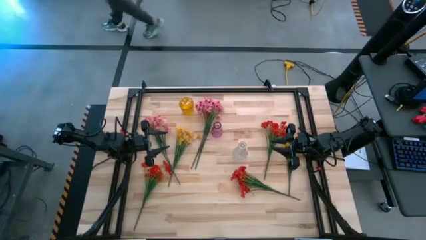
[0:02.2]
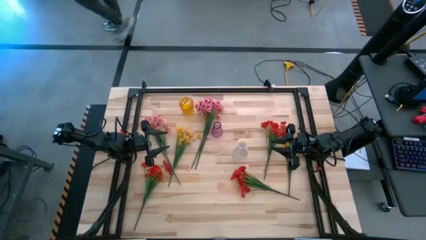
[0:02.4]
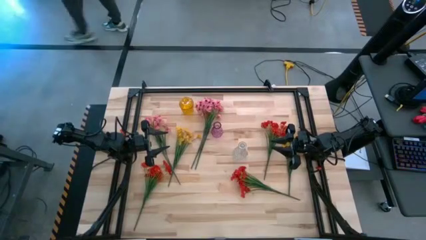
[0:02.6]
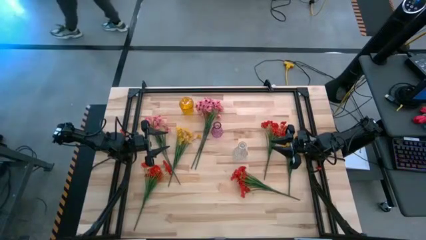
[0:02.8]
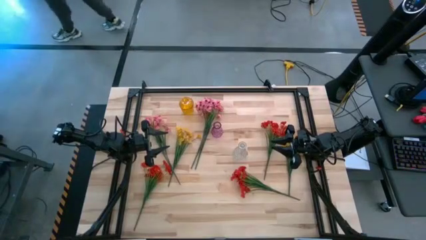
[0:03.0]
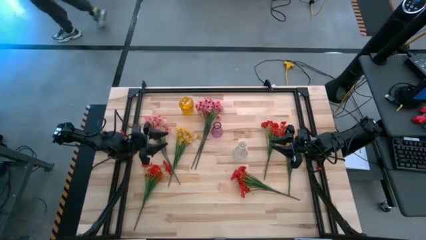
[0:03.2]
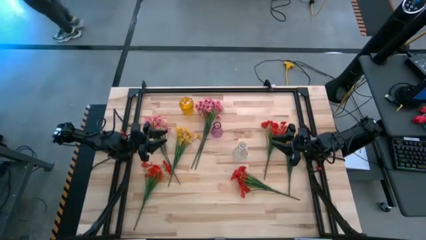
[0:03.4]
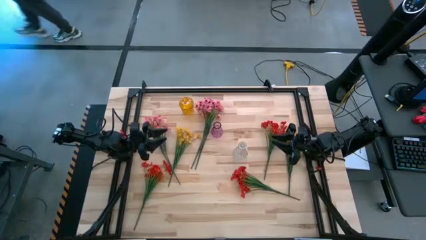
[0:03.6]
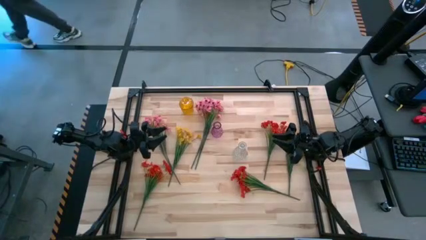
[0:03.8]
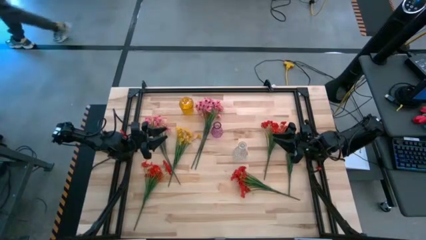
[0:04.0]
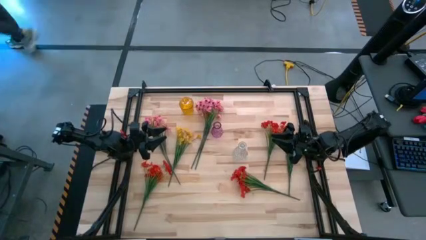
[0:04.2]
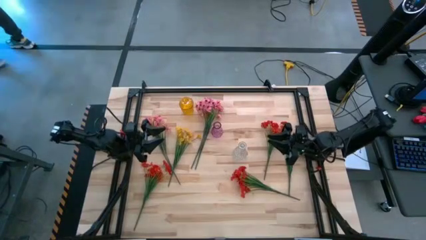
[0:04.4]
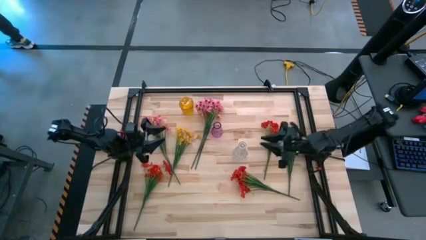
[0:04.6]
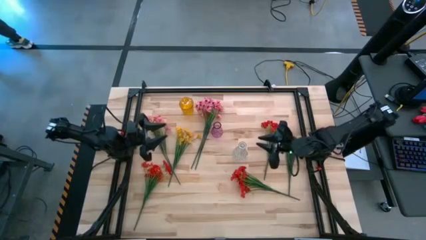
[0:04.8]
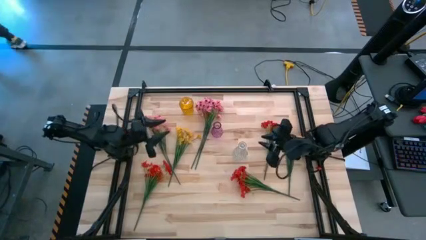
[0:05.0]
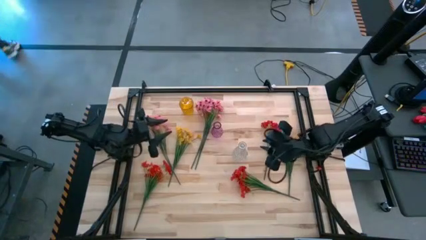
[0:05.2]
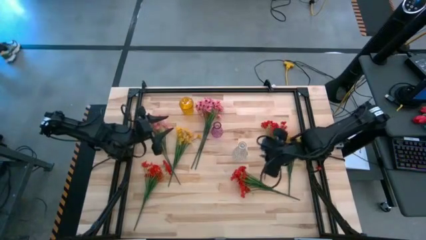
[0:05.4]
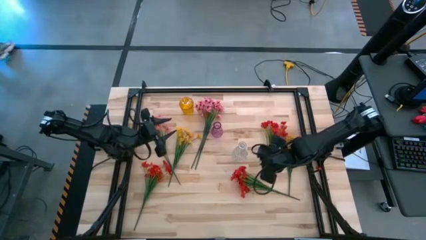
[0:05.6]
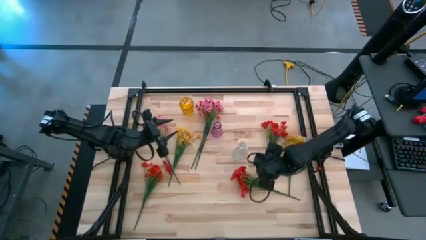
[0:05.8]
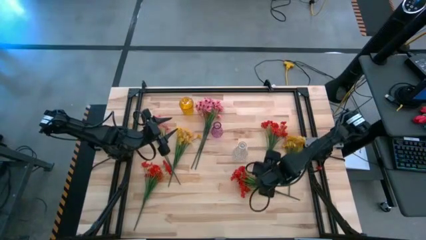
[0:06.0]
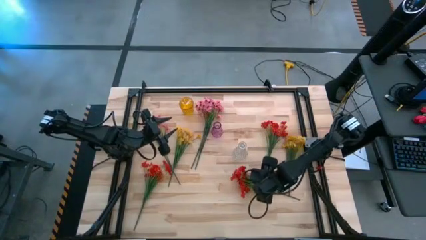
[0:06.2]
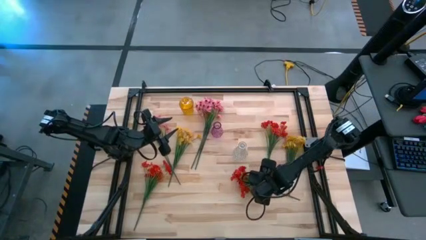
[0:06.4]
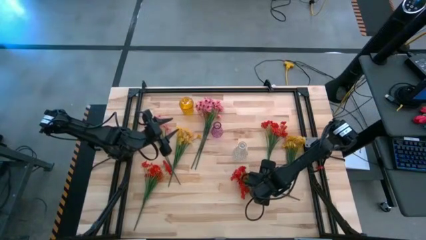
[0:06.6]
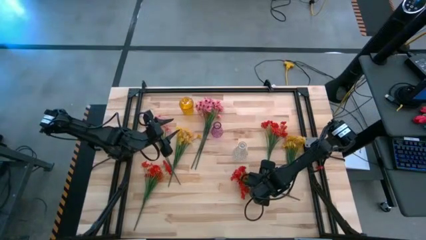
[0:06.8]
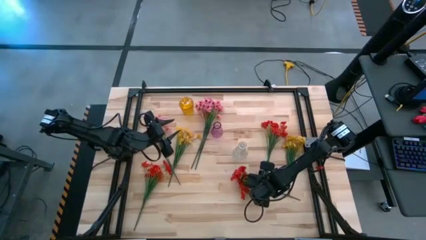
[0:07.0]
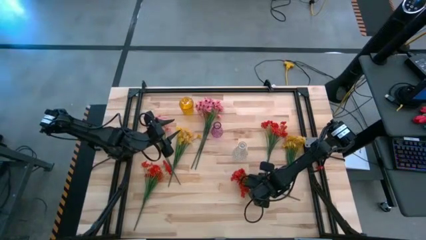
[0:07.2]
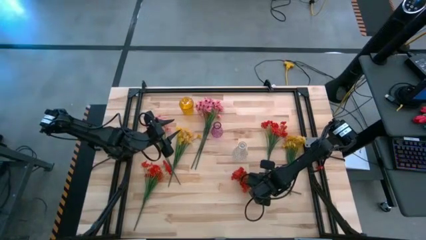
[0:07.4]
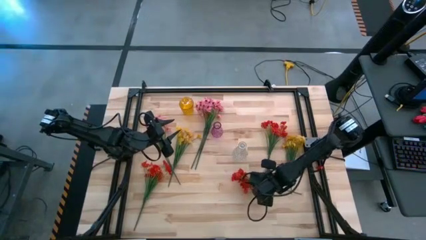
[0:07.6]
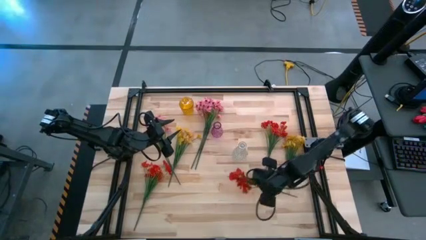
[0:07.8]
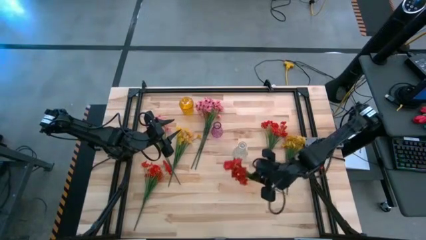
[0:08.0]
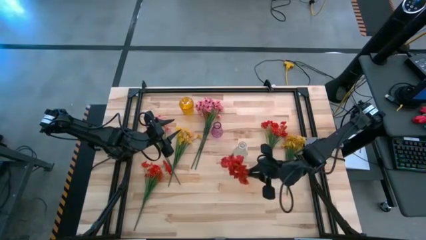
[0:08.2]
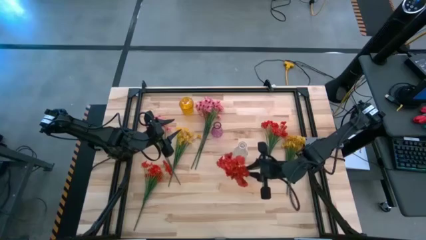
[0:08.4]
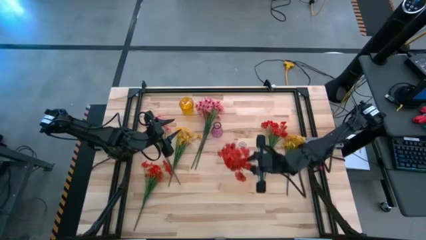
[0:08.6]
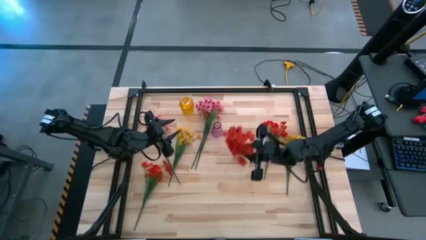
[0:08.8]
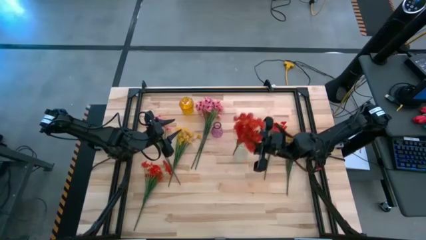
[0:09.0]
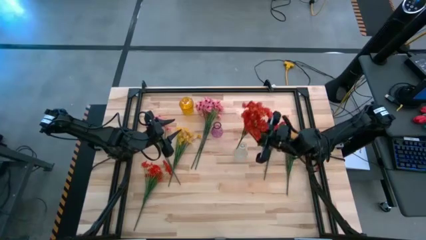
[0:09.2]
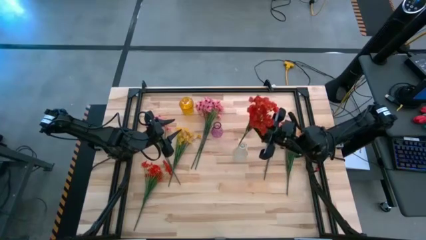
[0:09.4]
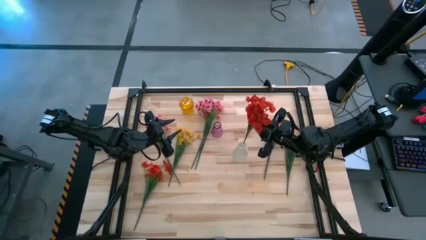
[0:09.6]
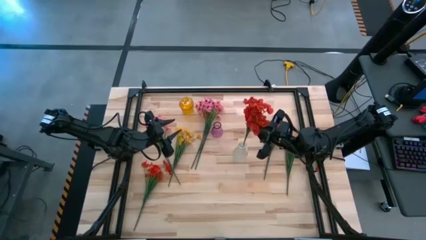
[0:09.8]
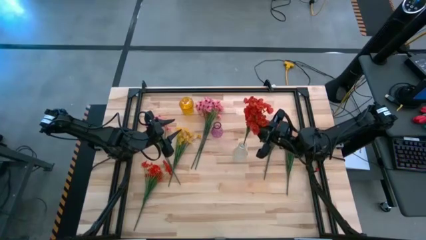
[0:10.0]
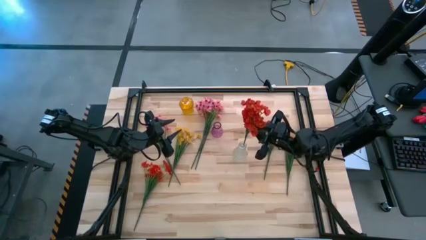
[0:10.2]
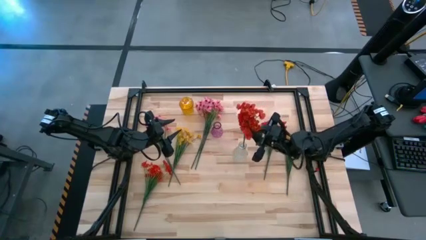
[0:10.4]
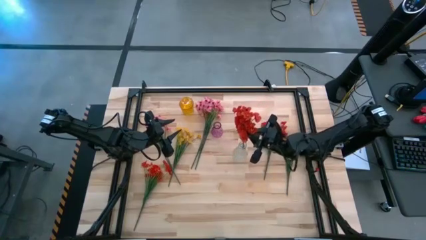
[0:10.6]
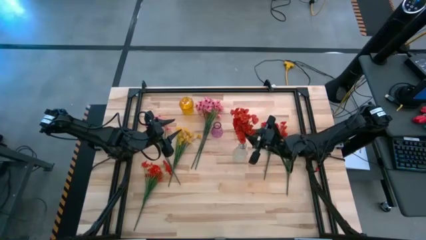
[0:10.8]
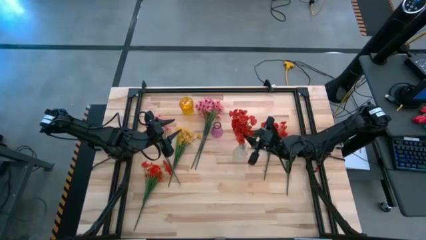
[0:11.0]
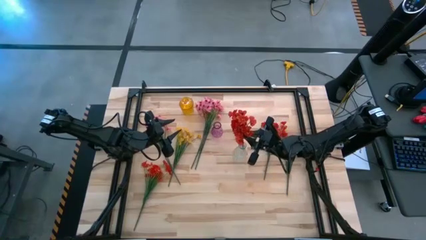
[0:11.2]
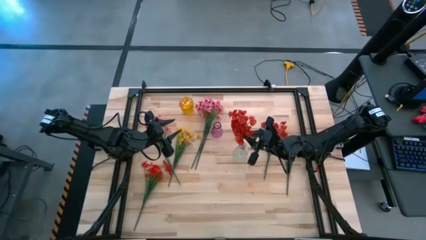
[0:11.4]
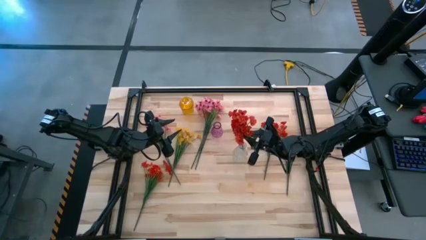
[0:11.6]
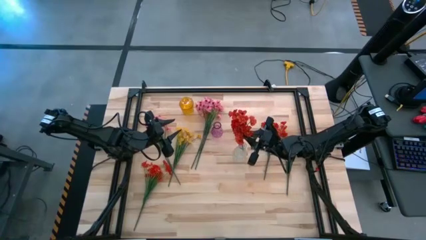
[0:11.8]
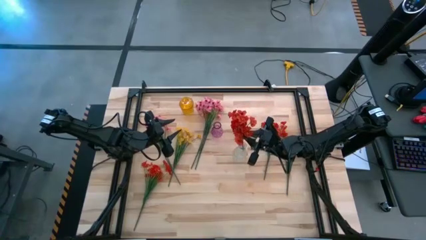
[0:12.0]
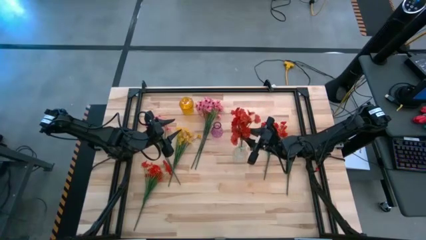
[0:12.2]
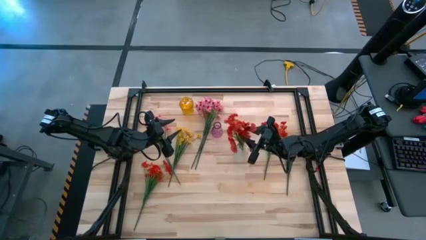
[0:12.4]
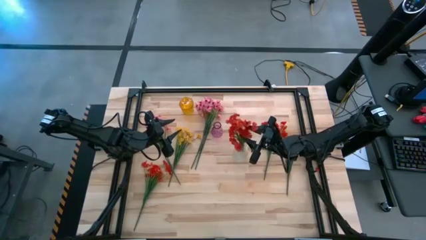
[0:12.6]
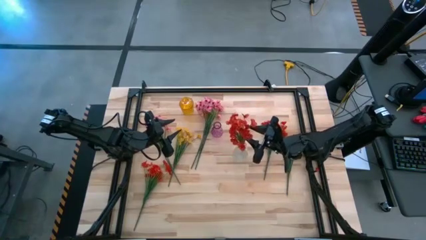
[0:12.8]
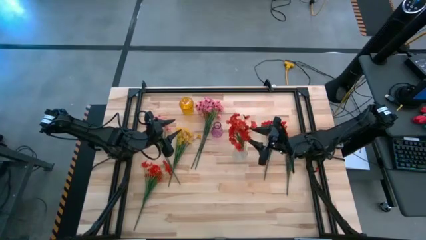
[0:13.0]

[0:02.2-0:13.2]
Task: Sort flowers into vase by color
Put the bottom right red flowers into the transparent vase

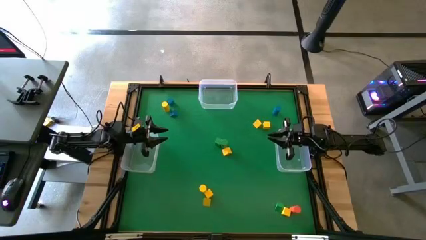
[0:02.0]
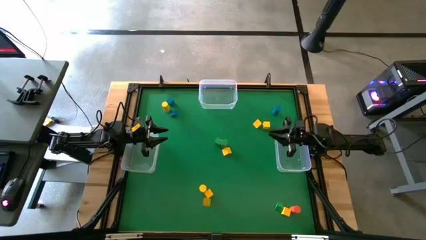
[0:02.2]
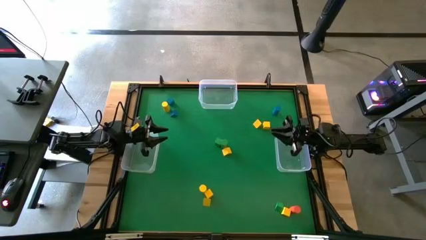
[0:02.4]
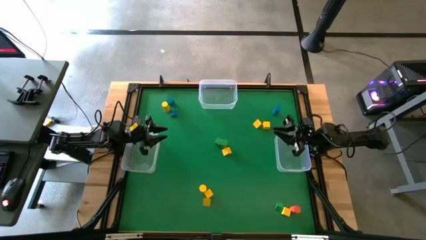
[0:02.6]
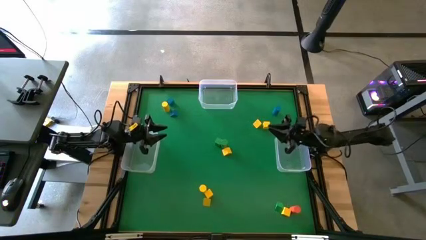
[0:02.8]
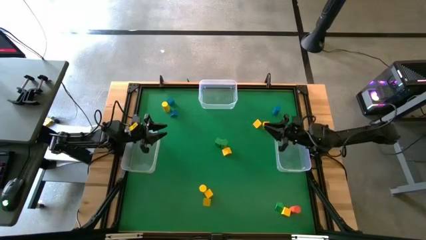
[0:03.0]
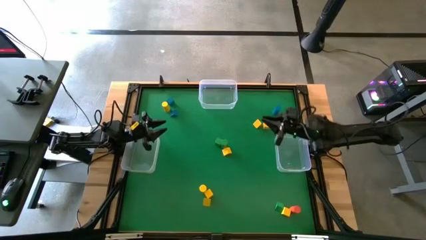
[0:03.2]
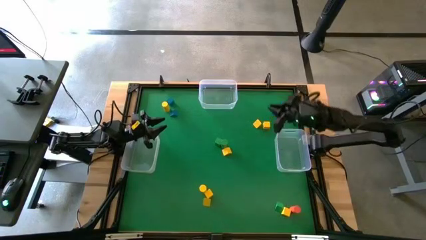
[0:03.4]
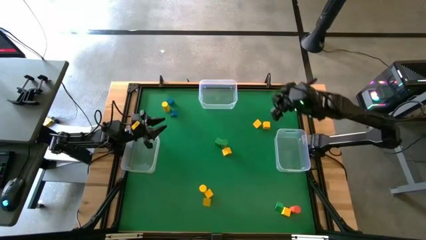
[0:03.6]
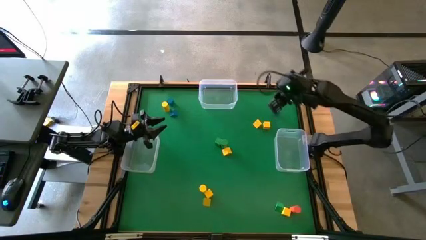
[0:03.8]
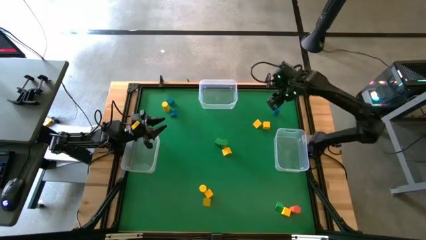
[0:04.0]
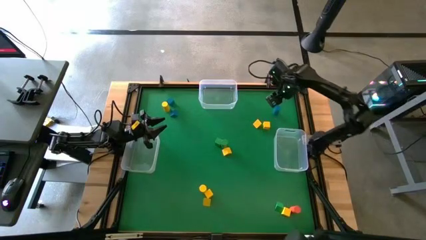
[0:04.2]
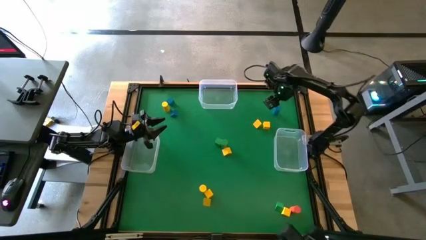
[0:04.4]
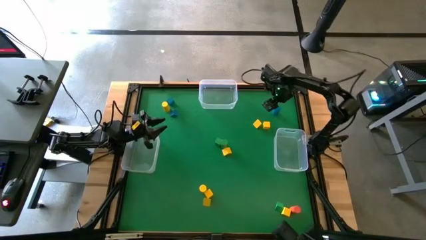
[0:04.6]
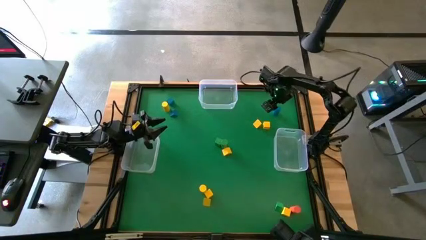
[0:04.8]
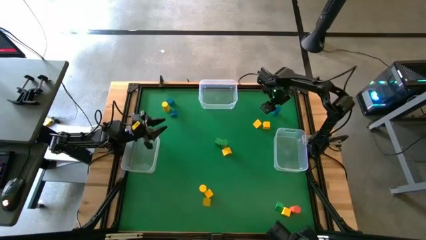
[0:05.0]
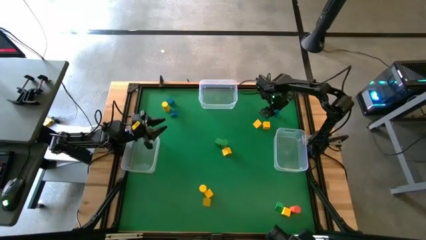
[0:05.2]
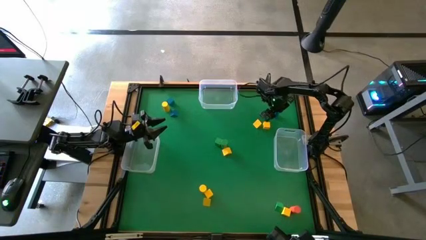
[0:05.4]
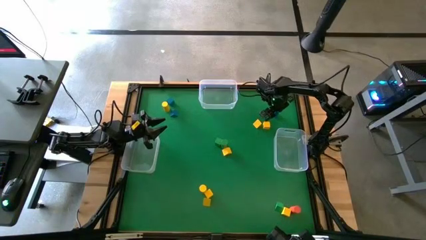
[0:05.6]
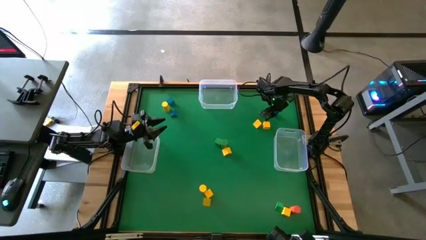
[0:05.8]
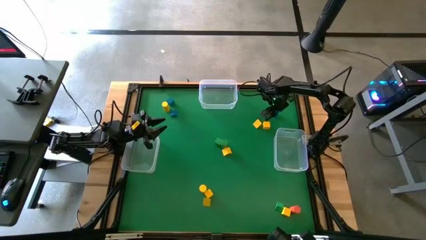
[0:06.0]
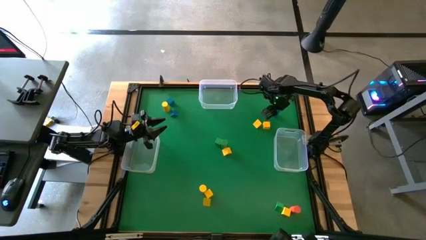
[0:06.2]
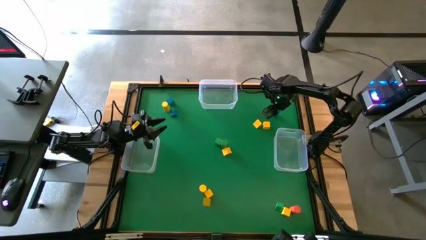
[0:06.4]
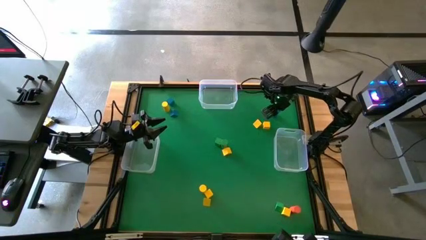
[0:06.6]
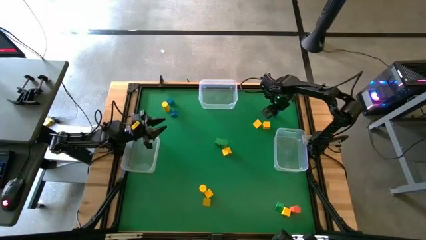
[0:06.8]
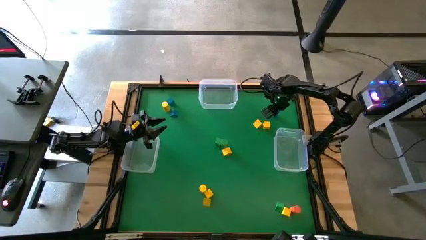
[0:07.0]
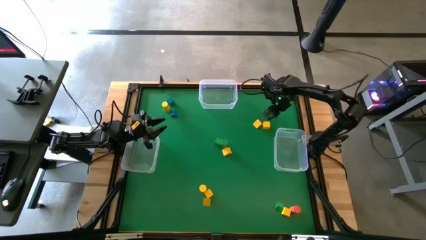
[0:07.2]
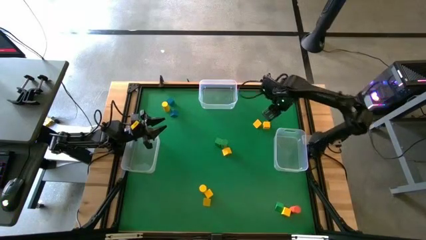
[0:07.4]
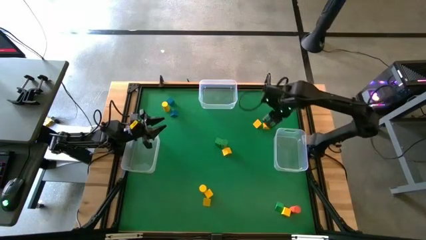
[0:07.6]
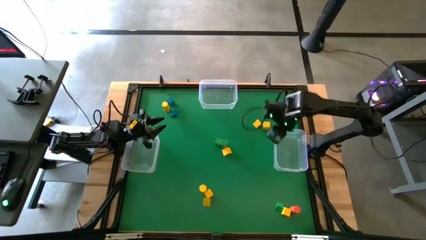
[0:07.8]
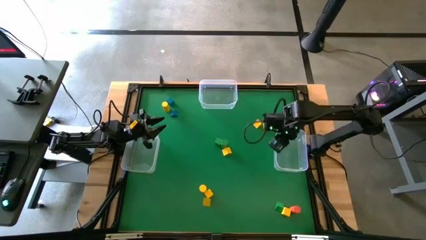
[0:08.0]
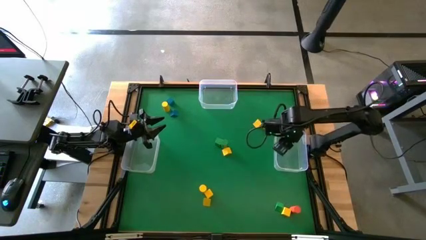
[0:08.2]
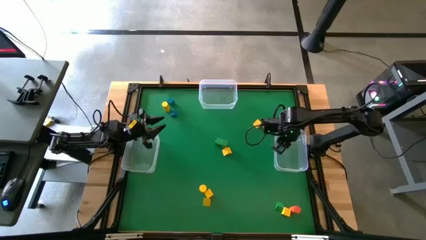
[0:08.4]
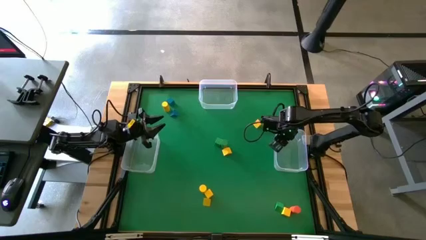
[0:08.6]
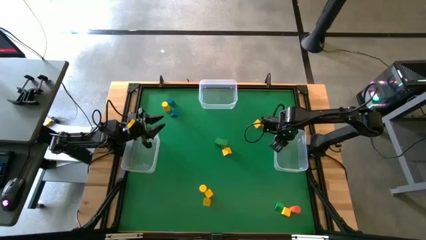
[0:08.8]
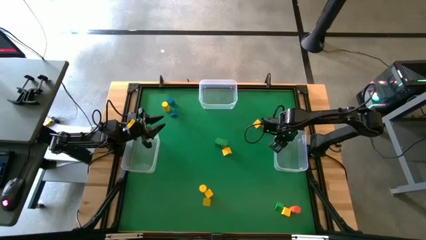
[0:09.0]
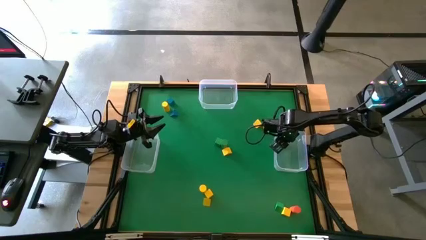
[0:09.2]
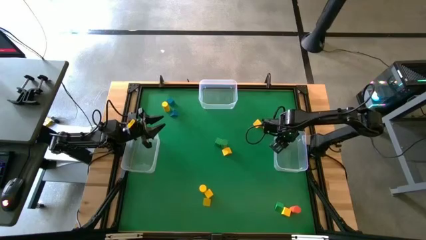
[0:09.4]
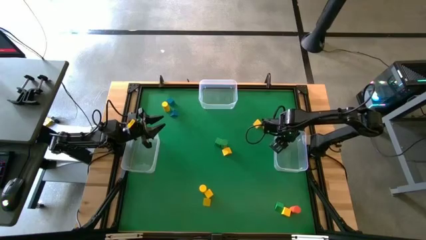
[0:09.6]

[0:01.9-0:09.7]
Task: Sort blocks by size
Put the blue cylindrical block into the right transparent bin
